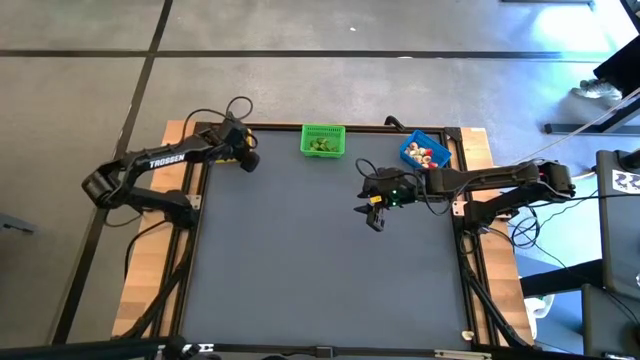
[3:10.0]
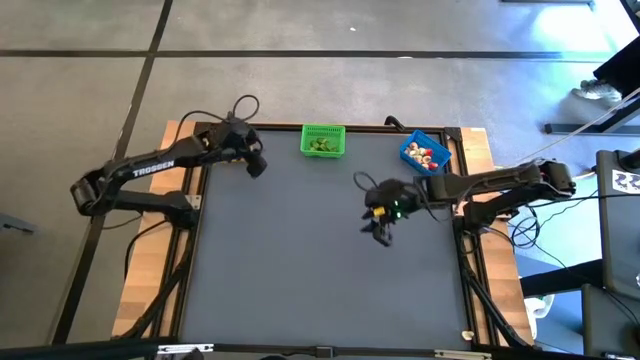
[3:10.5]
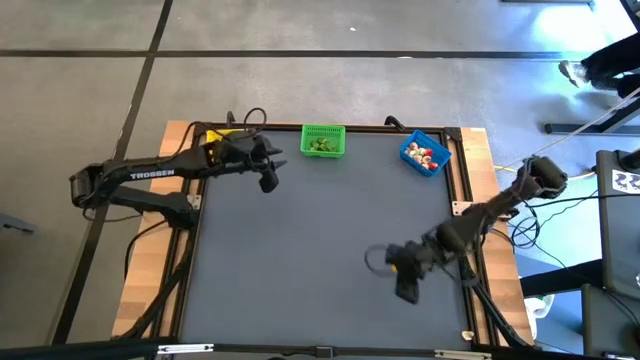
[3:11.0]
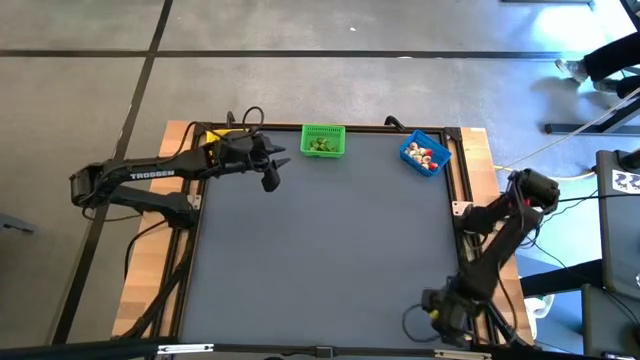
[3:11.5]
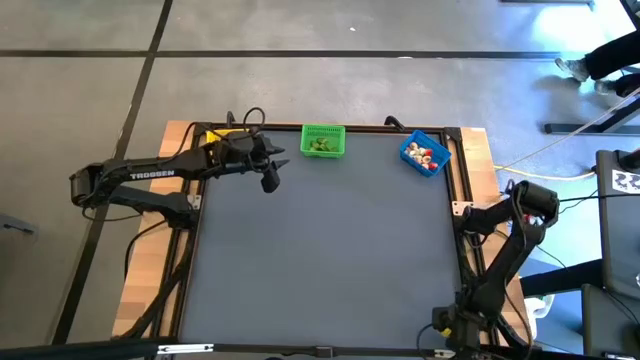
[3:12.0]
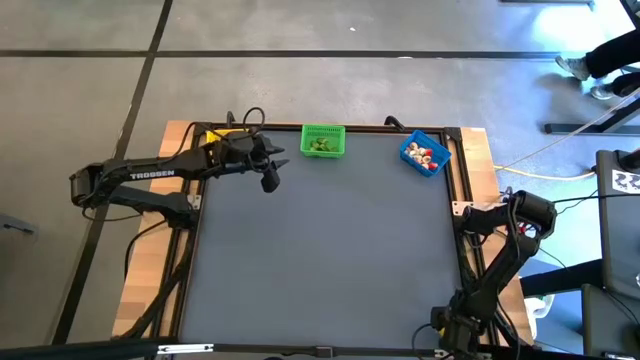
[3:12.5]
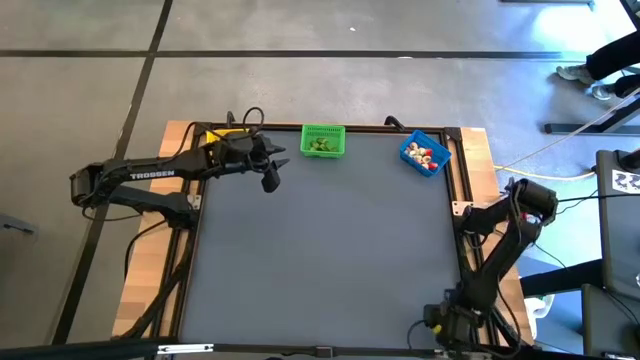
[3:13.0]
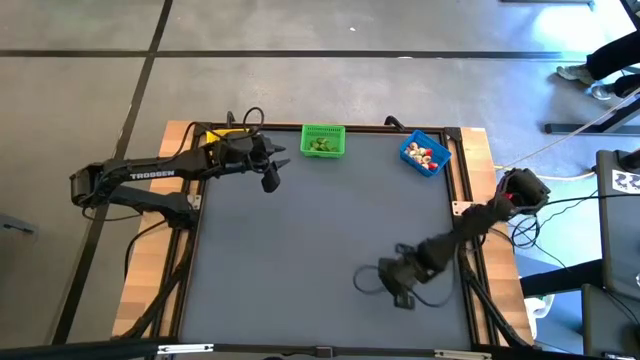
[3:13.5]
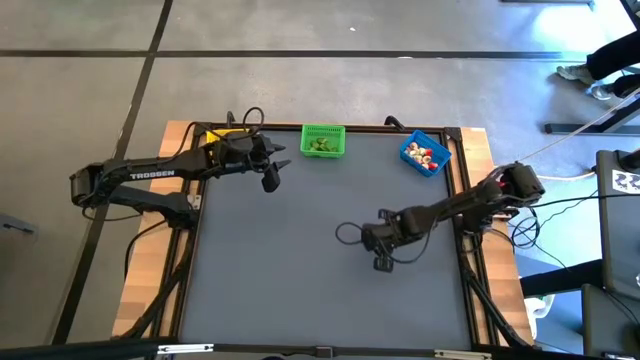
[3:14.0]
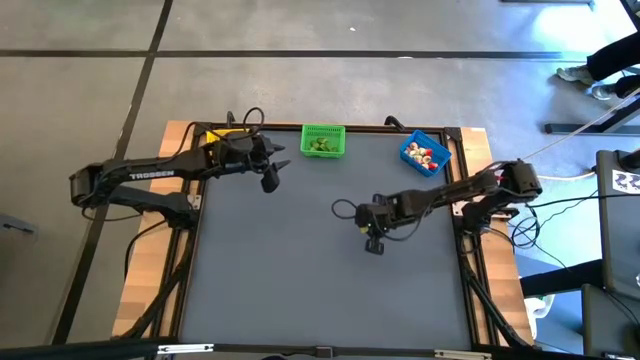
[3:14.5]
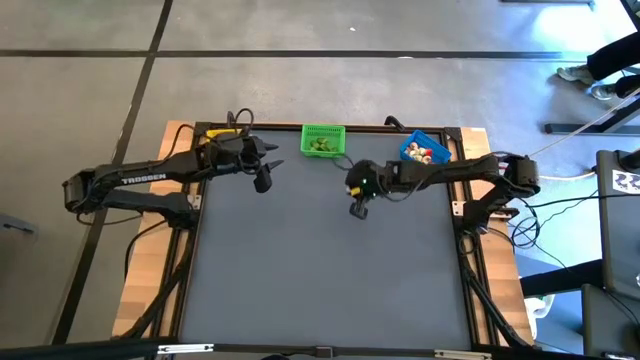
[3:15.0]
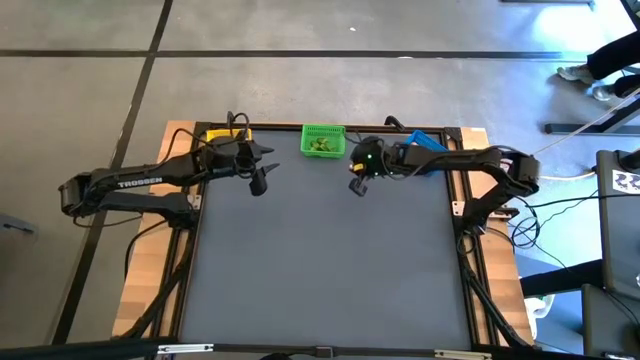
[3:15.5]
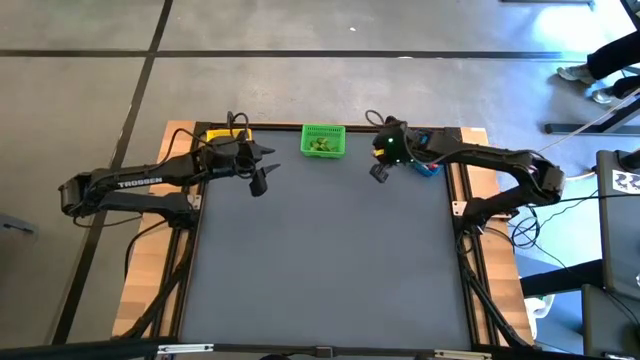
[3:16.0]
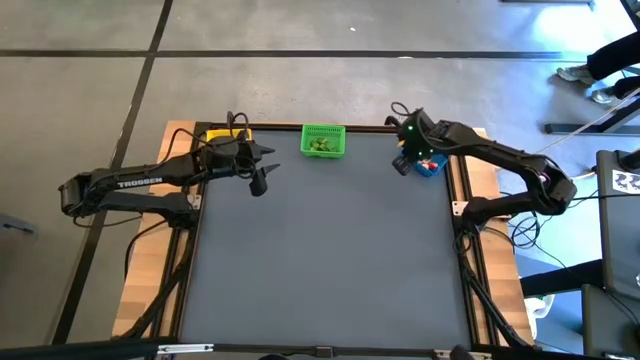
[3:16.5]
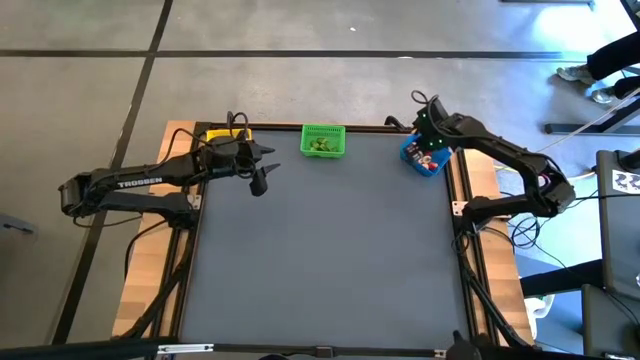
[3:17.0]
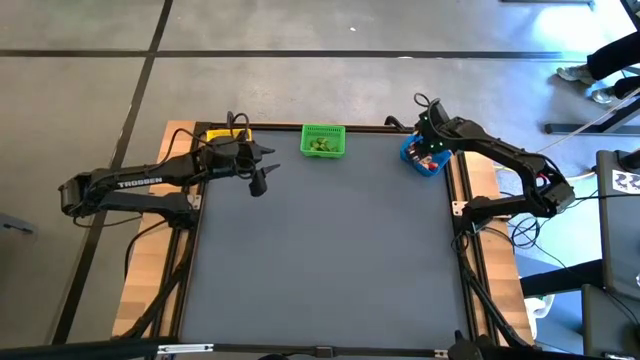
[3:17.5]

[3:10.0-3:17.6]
Task: Sort produce into baskets
Put the brown mushroom into the blue basket

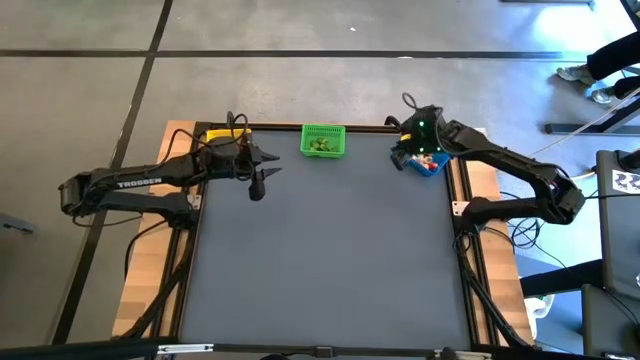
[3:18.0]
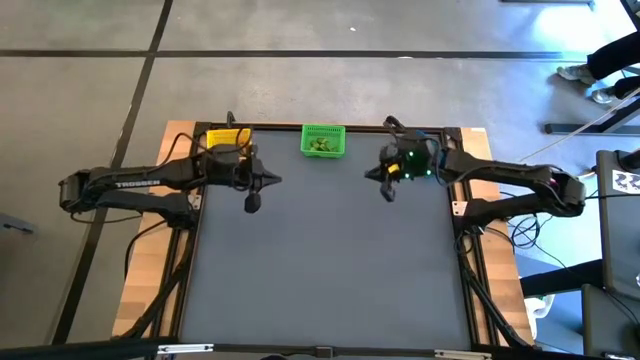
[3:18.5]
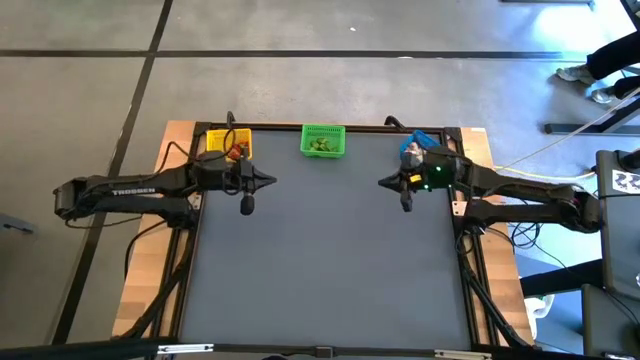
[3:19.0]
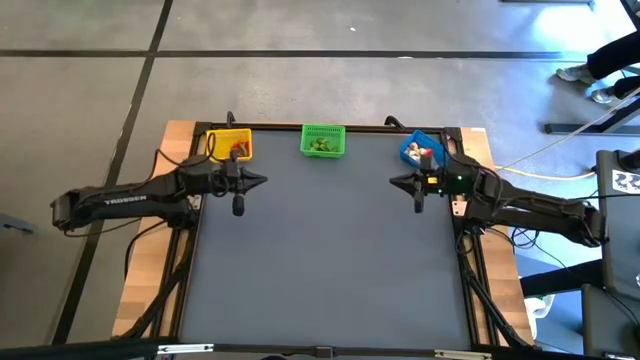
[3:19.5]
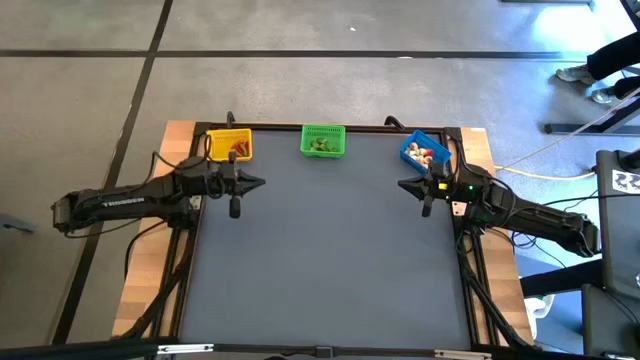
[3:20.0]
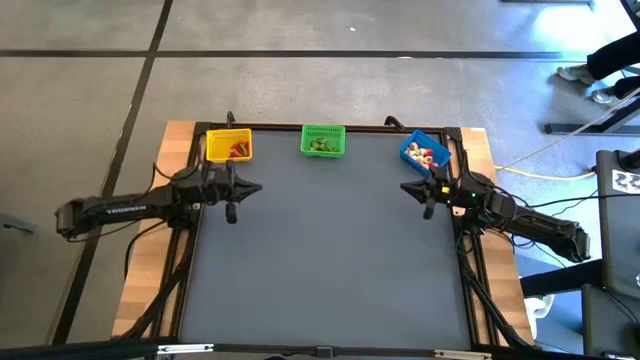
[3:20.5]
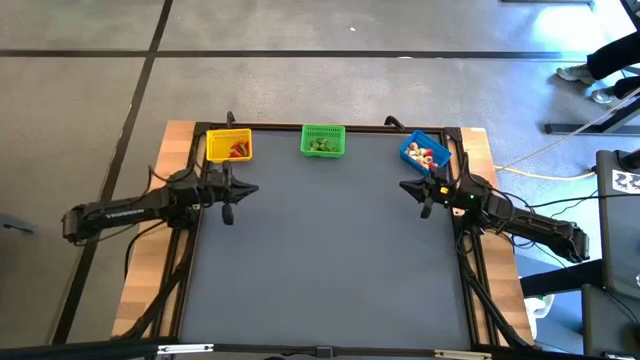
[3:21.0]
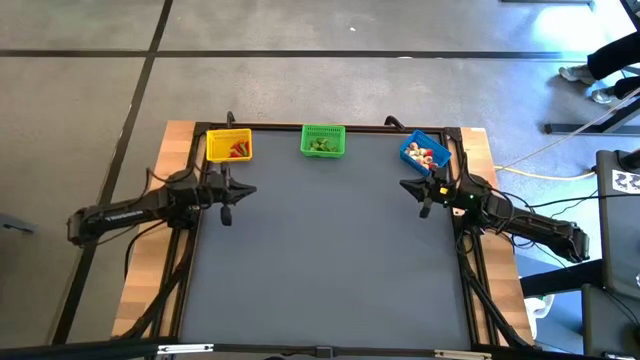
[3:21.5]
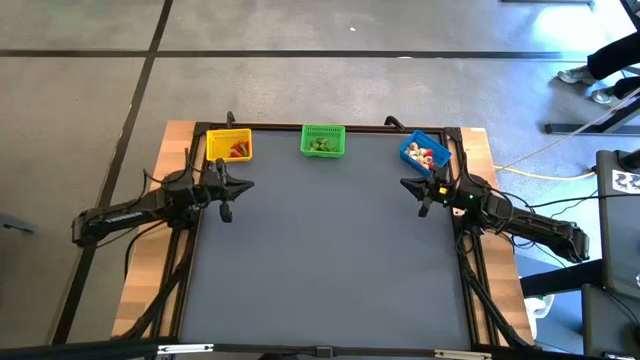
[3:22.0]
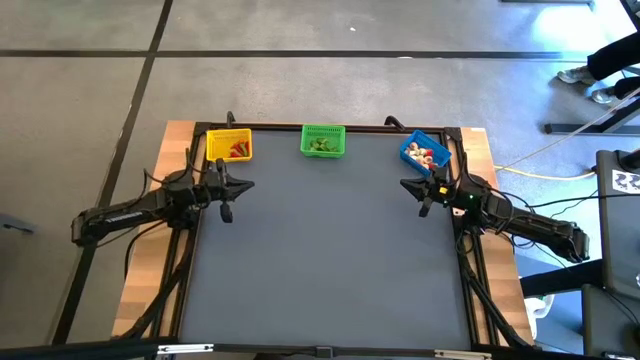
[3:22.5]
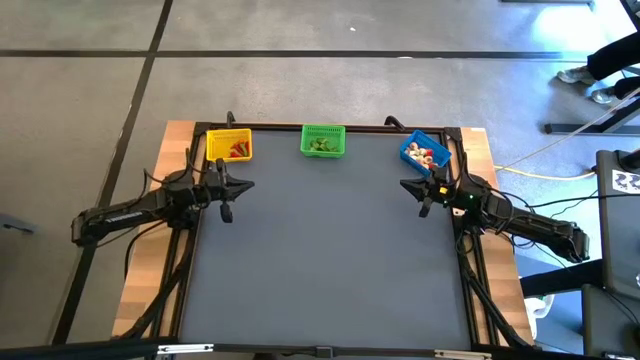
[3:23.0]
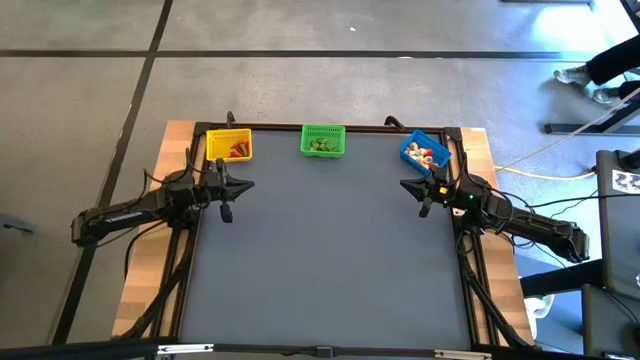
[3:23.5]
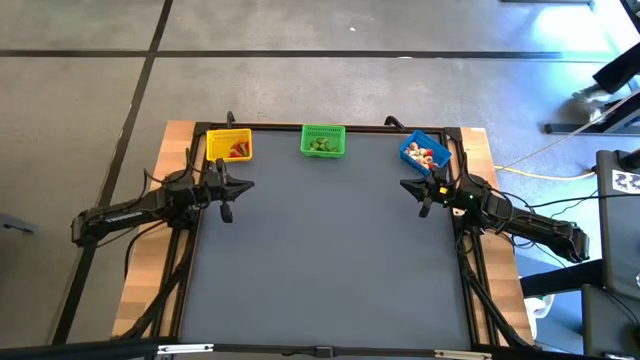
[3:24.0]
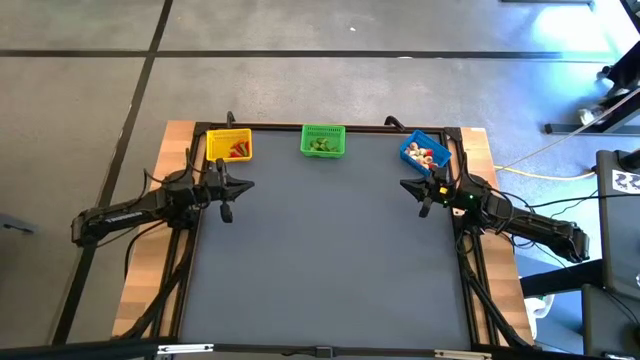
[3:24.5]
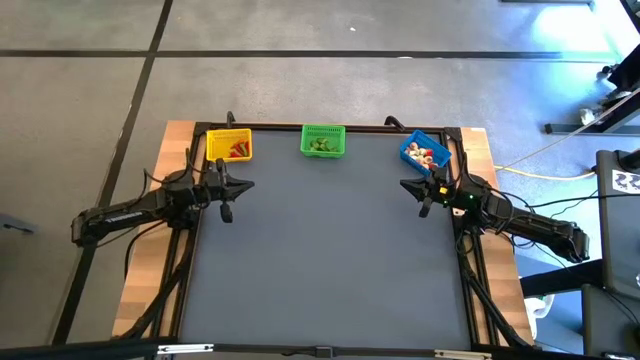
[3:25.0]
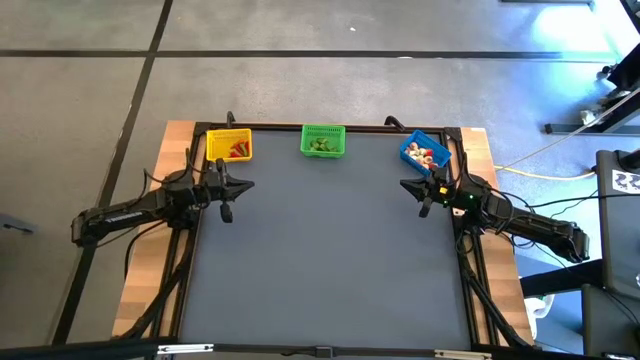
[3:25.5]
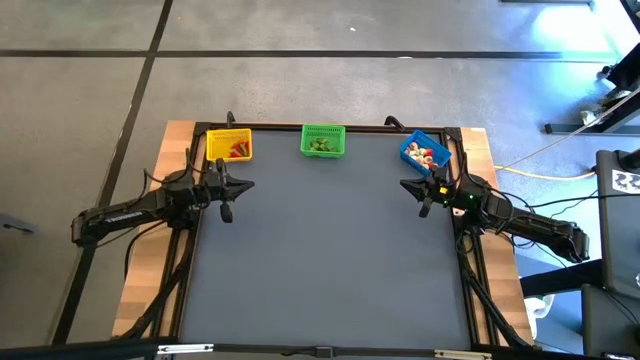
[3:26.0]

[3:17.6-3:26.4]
Return to Home Position

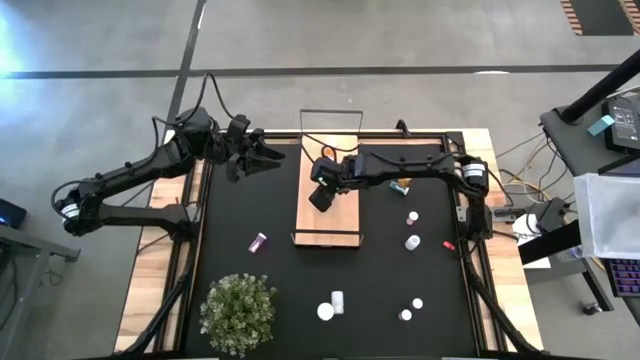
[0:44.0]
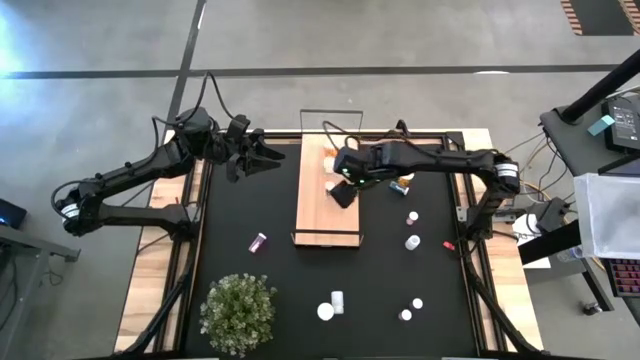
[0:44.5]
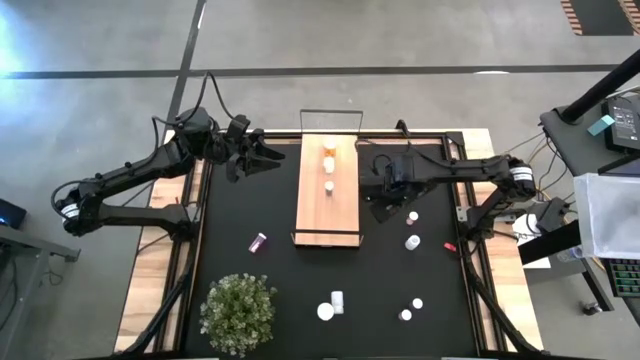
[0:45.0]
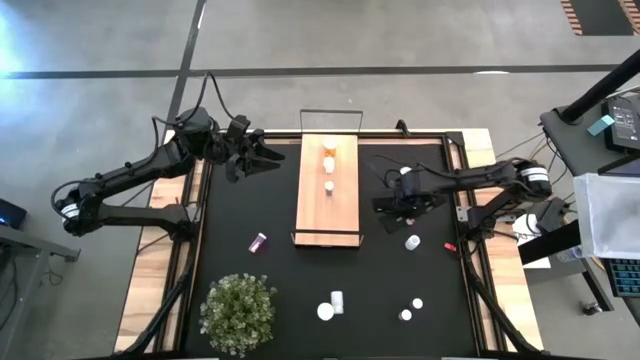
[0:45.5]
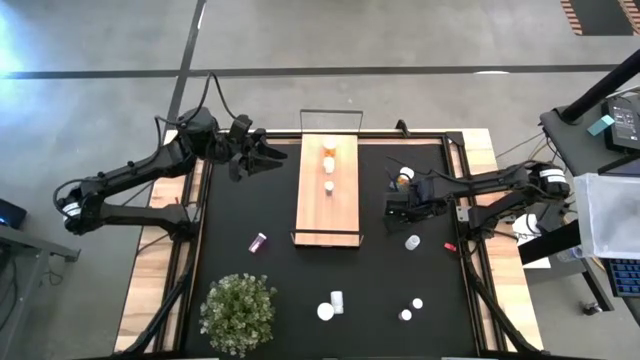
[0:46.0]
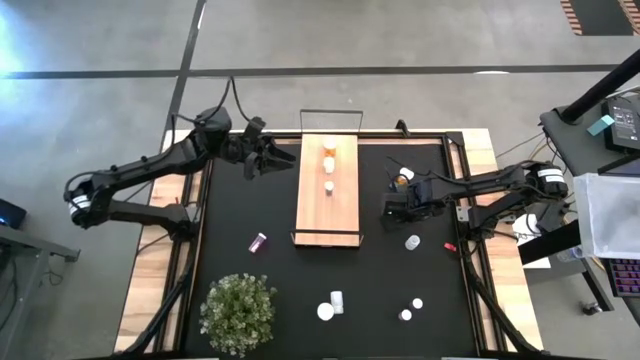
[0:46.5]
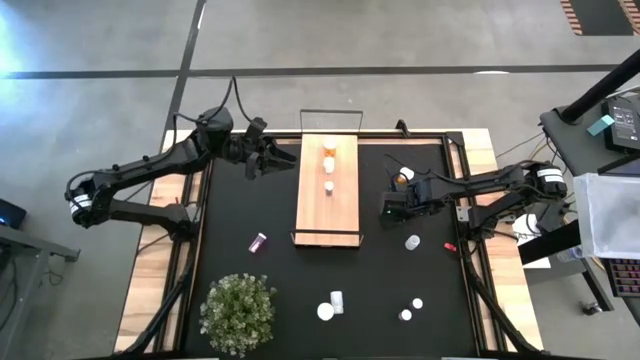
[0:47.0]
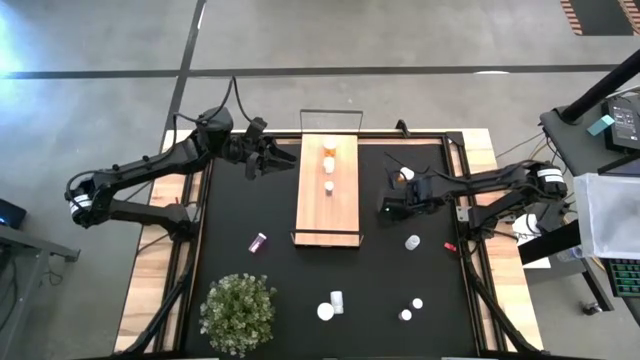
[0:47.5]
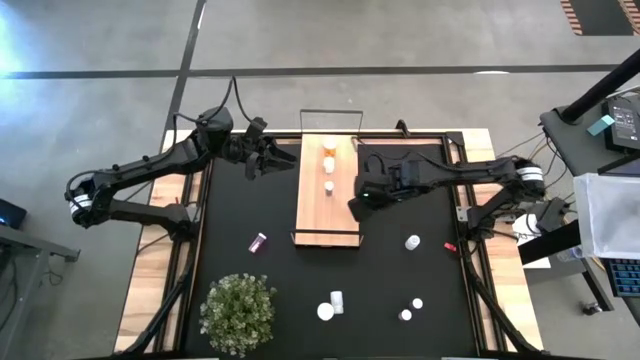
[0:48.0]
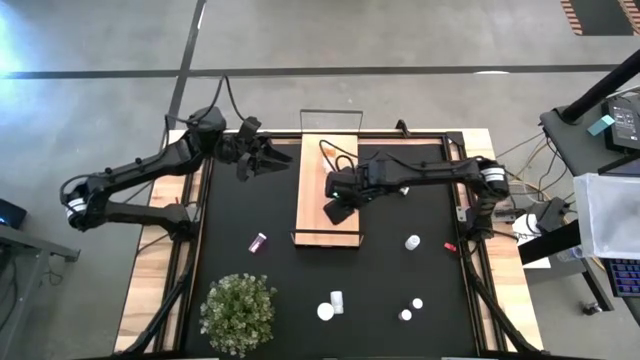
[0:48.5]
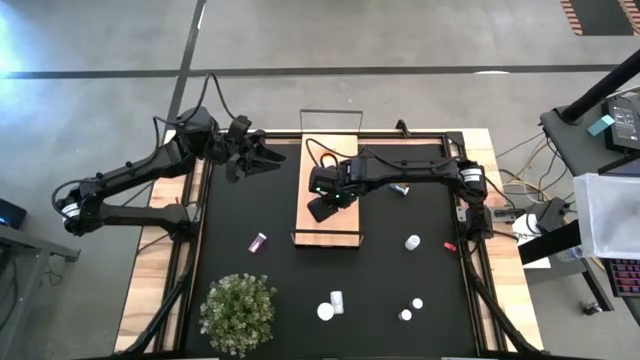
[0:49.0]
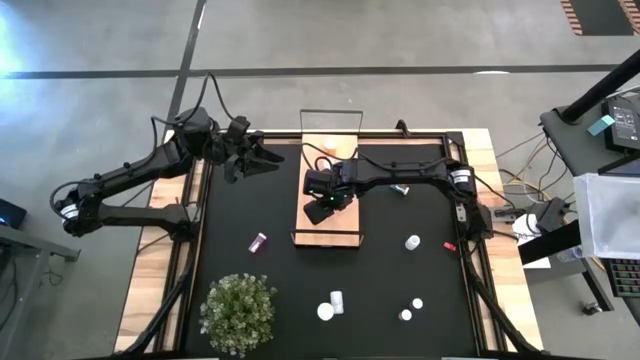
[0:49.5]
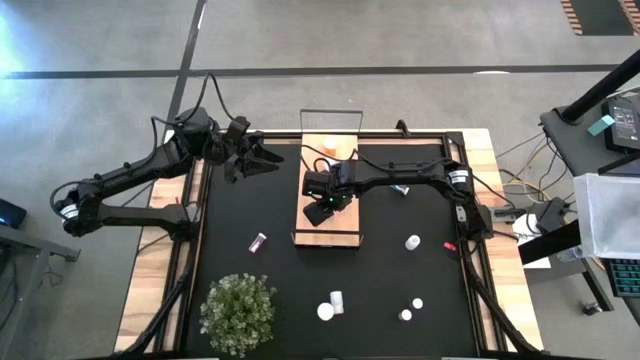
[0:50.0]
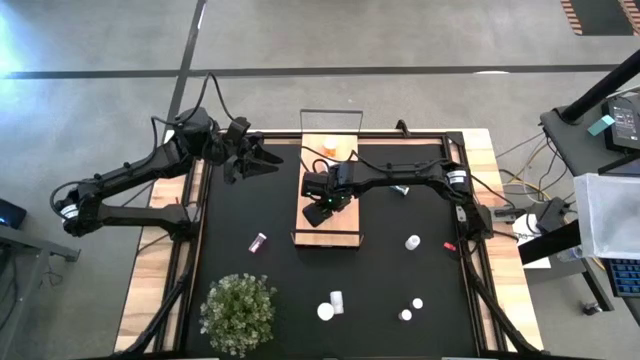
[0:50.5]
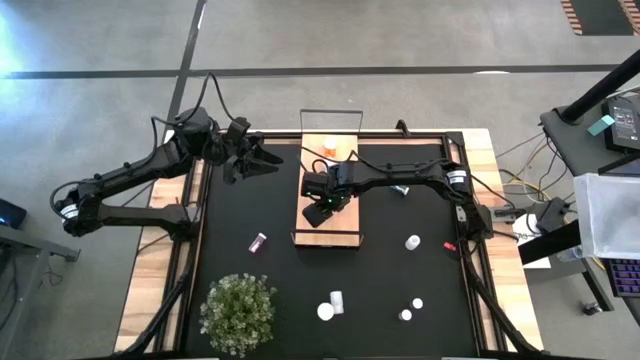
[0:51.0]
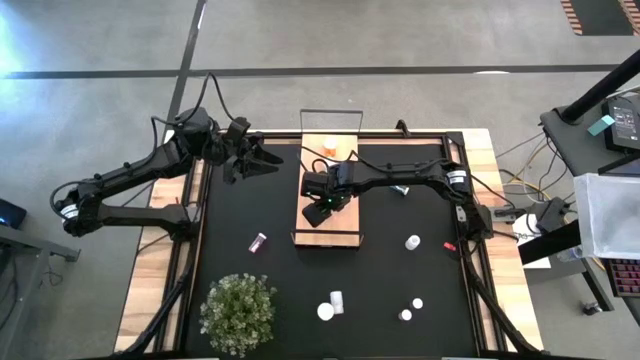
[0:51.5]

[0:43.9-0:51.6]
Task: Pick and place medicine bottles onto shelf by color
Put the top right pink pill bottle on the shelf
